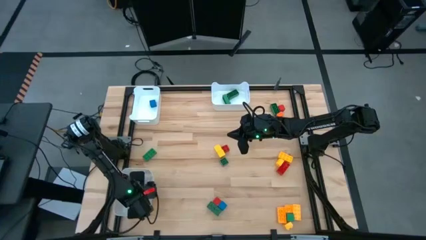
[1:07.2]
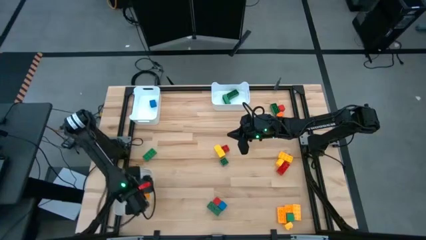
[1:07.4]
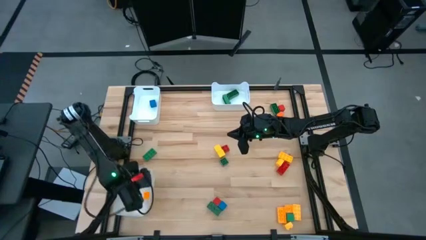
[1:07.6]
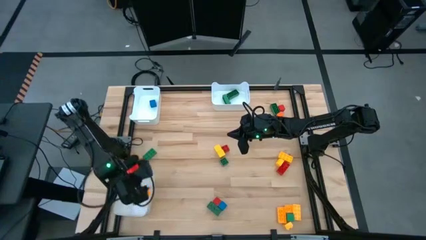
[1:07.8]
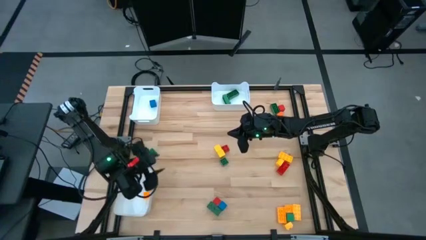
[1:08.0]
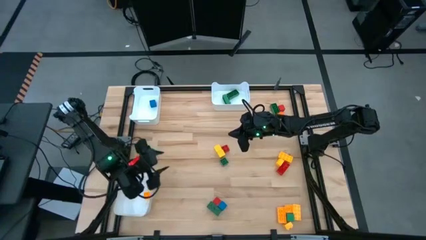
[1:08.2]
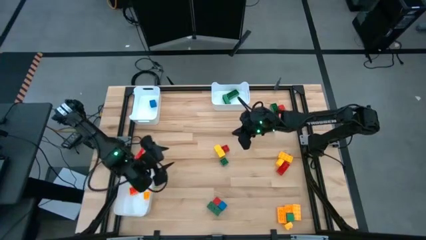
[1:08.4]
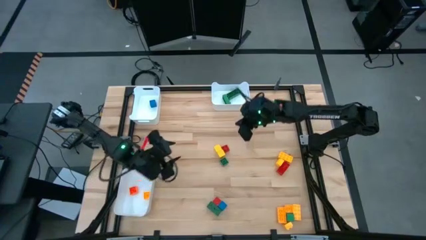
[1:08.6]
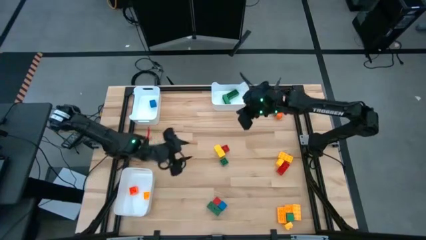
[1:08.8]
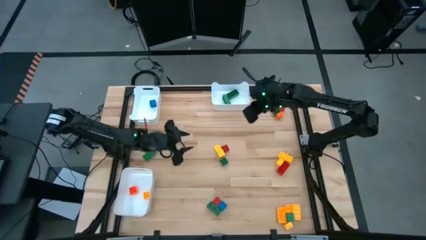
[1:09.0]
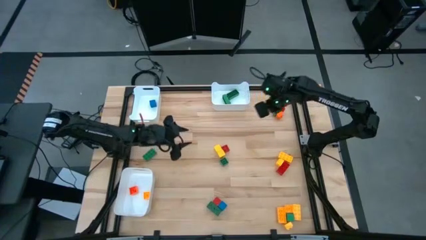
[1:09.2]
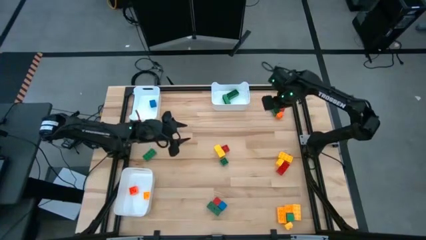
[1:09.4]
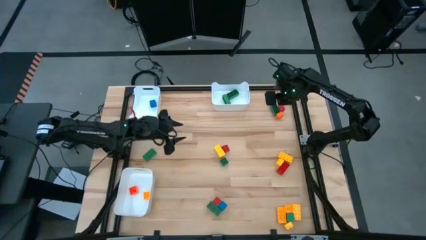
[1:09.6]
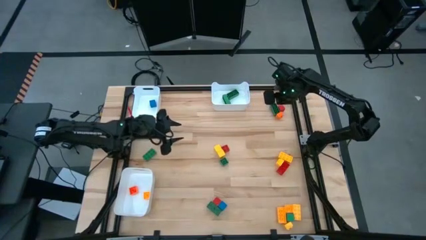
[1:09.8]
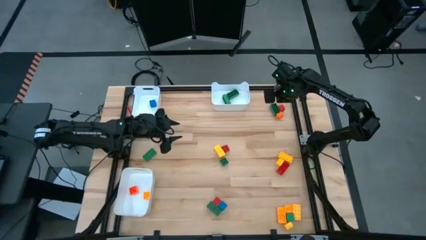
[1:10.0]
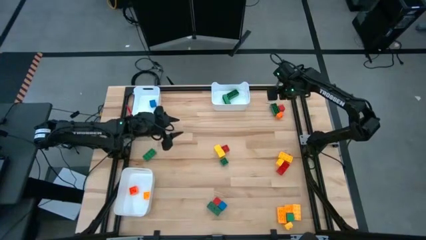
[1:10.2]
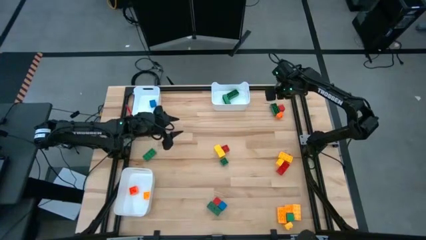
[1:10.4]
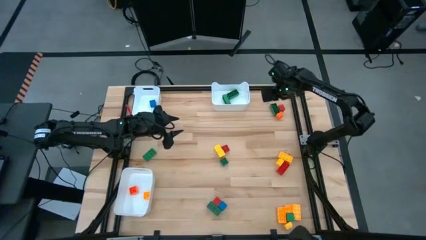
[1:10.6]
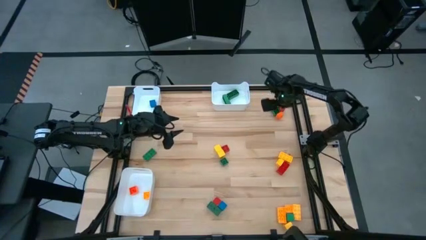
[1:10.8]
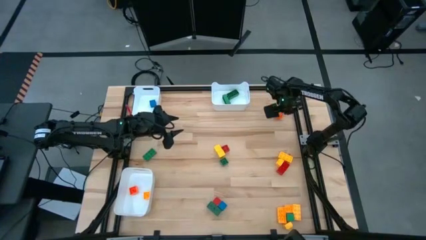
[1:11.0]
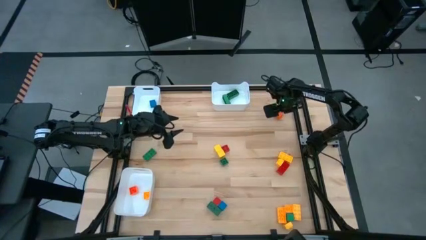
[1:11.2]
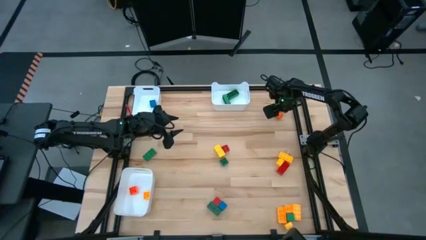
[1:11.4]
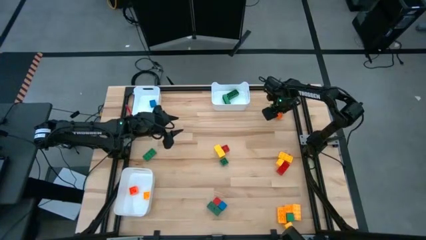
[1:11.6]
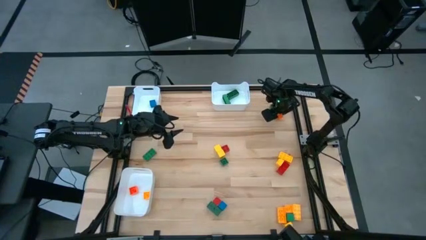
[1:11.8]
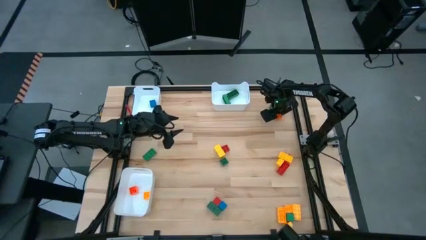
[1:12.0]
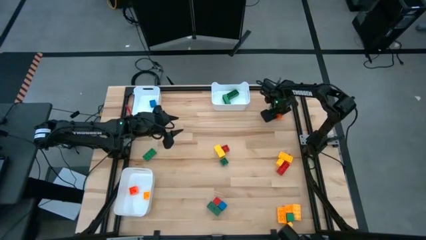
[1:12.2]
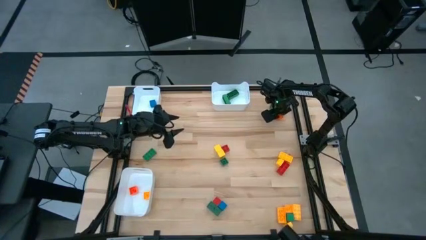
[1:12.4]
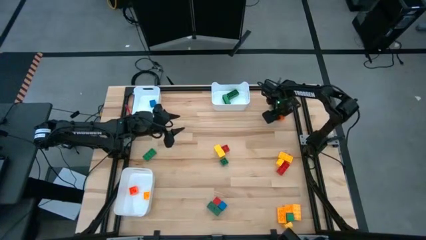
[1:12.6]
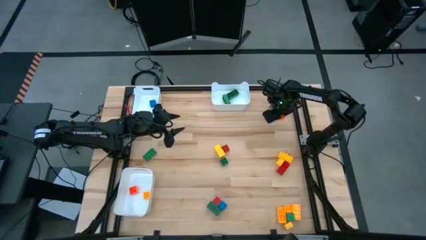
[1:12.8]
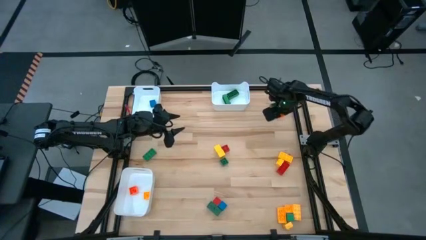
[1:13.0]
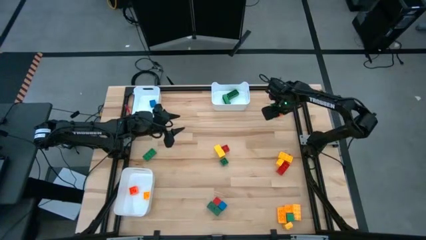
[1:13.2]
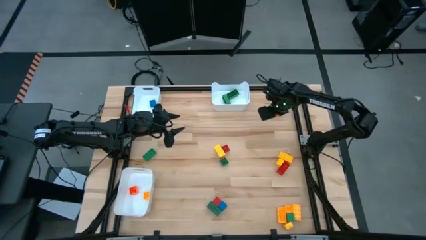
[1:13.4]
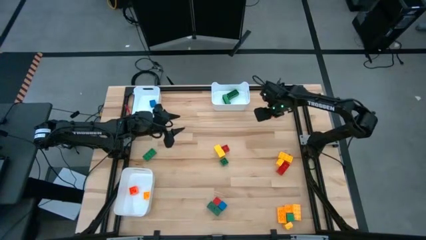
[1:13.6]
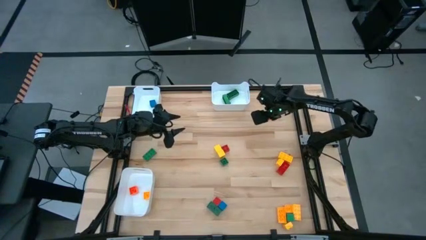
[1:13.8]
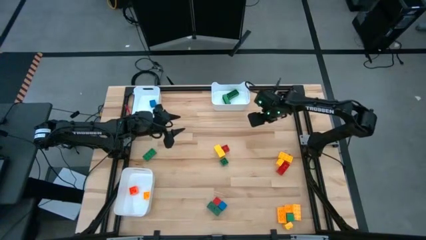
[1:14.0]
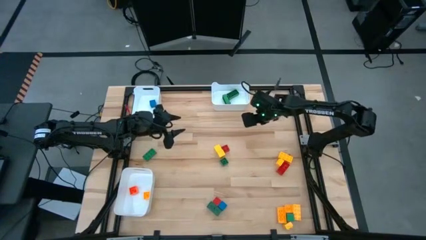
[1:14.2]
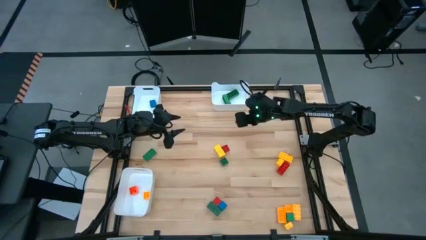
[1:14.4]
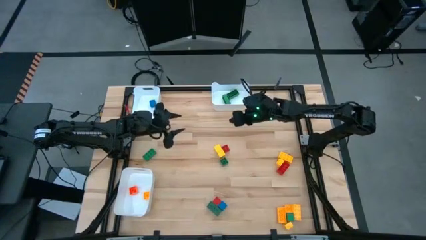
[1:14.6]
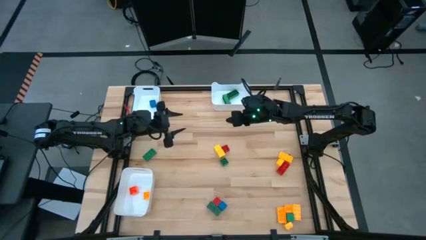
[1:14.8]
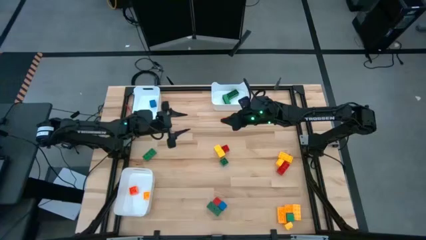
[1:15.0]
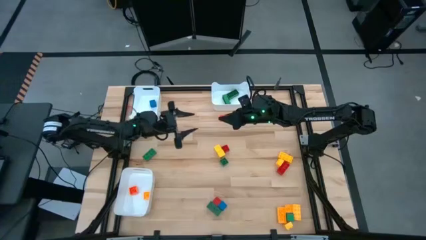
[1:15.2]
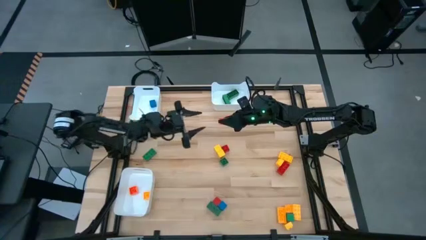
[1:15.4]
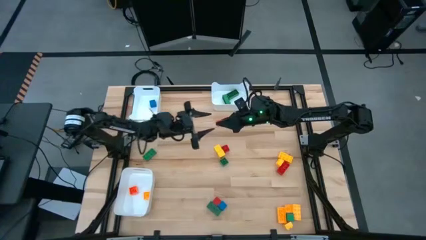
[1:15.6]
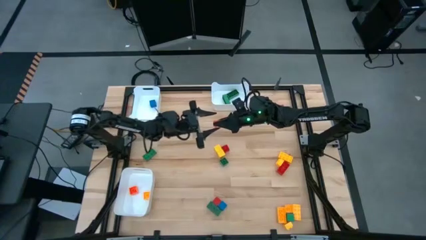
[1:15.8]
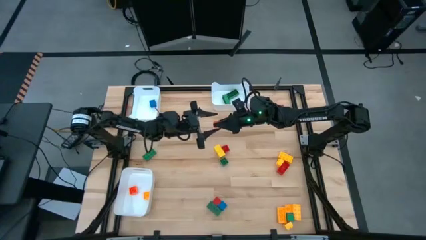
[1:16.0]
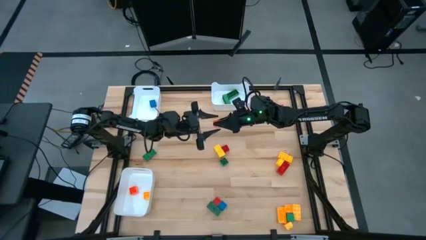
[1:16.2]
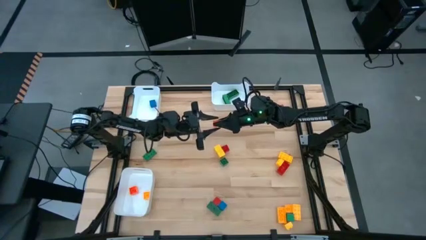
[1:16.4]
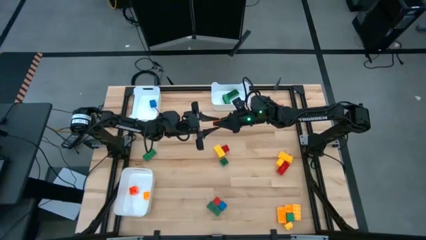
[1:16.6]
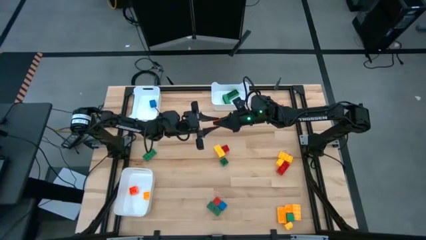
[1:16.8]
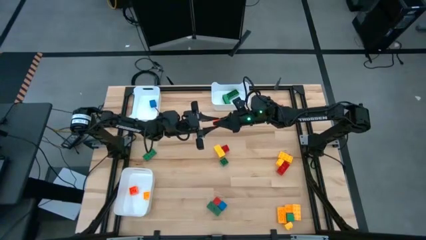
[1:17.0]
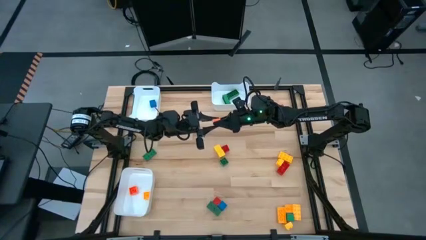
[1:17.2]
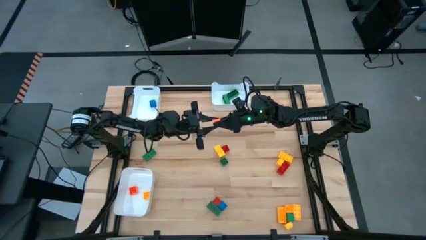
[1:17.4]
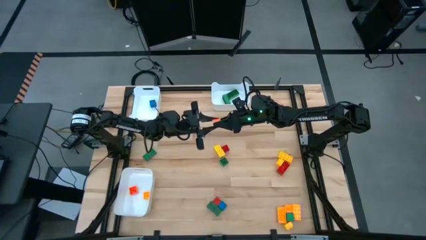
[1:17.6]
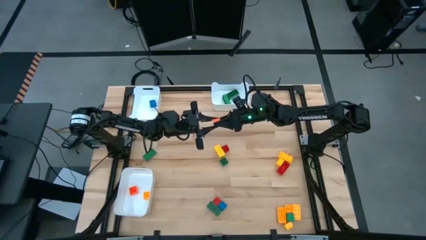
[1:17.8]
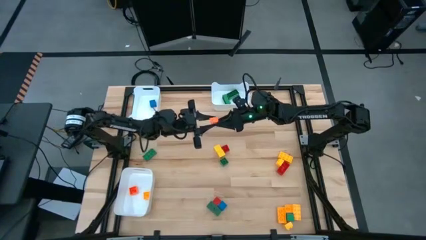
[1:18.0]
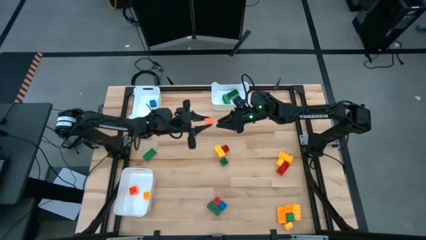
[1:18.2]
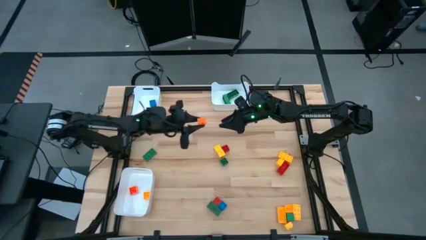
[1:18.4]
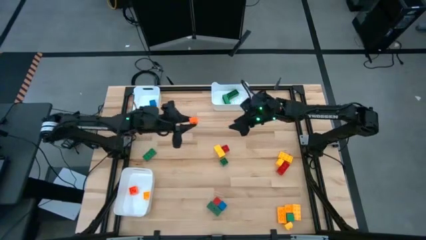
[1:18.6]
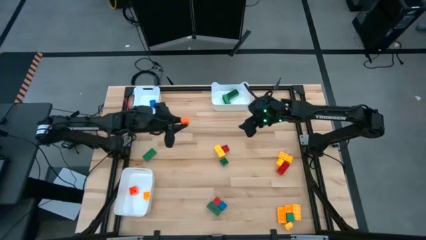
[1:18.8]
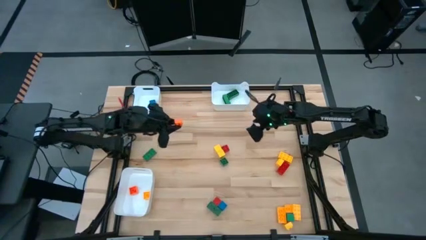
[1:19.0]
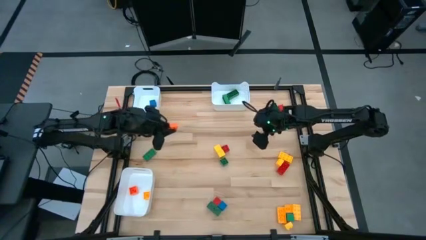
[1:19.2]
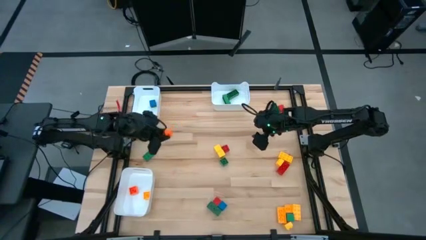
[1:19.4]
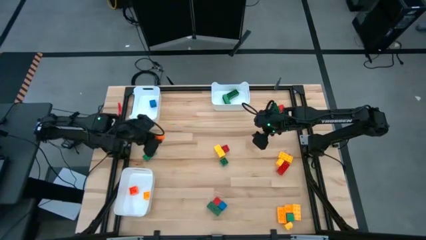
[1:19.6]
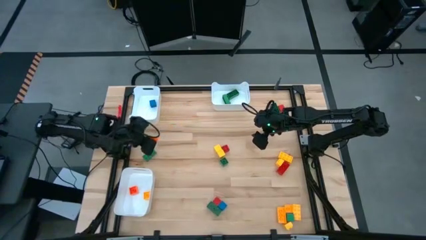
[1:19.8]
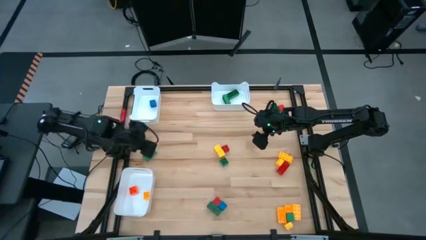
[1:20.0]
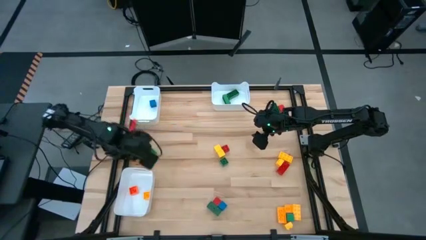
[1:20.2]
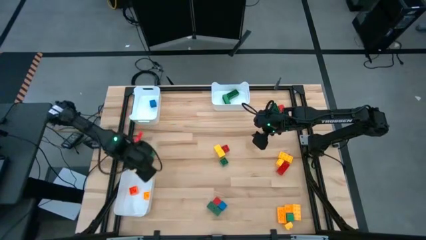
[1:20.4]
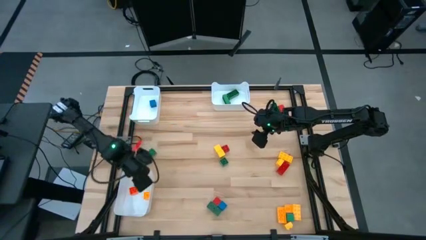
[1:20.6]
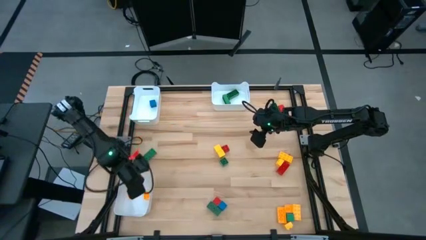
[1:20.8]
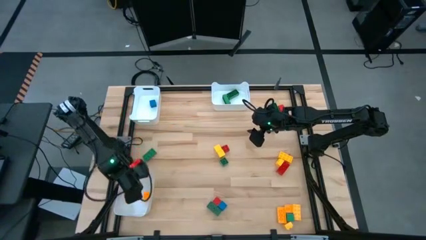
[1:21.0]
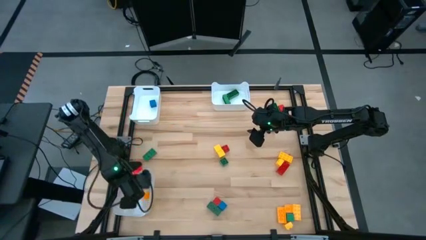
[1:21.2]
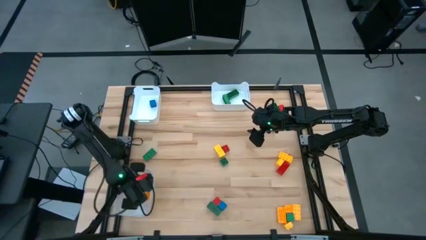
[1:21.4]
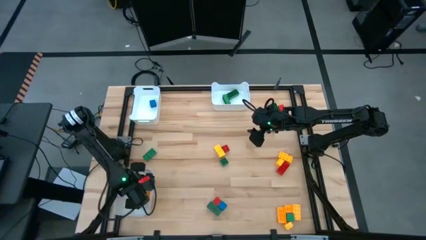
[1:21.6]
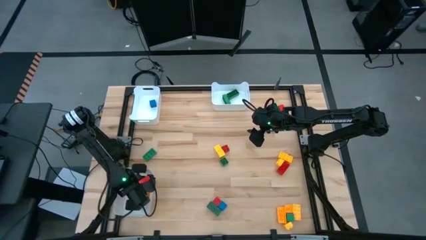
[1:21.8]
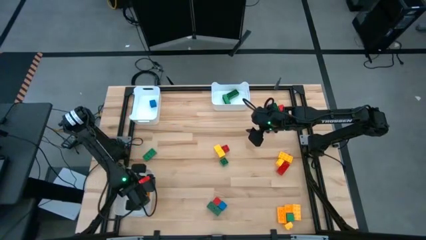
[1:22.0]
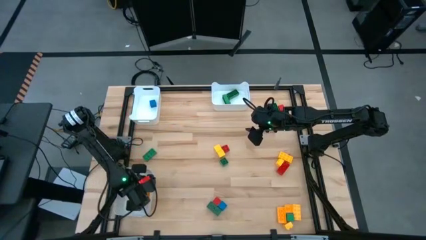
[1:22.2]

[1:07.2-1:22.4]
Task: Sort blocks by size
Put the orange 4 stud game piece into the bottom white bin

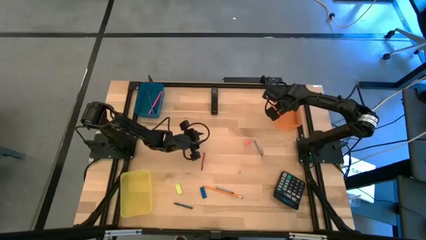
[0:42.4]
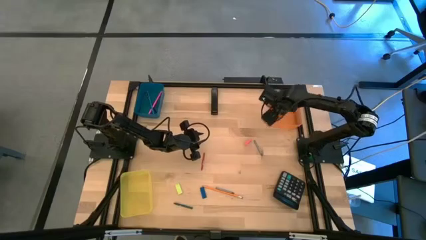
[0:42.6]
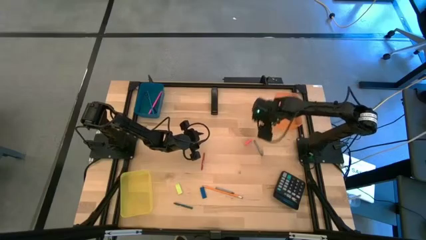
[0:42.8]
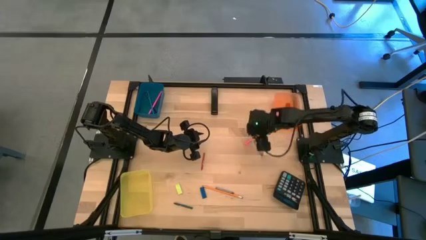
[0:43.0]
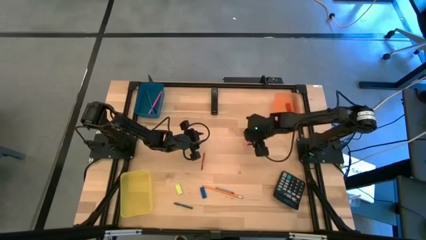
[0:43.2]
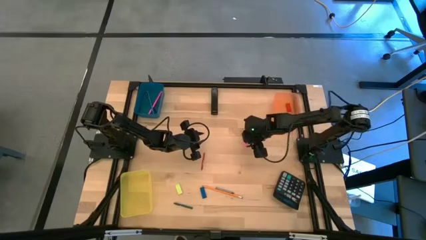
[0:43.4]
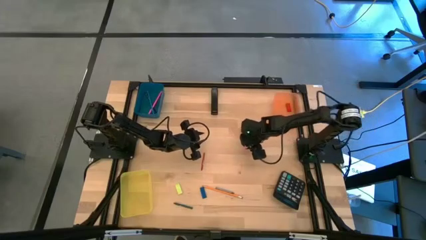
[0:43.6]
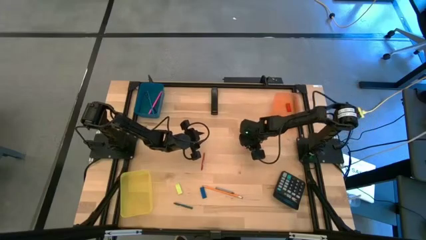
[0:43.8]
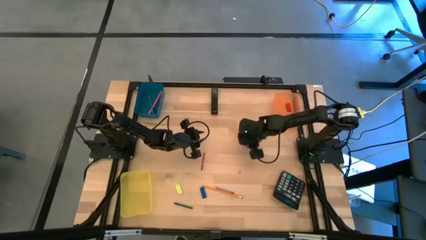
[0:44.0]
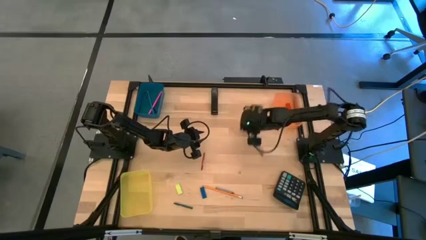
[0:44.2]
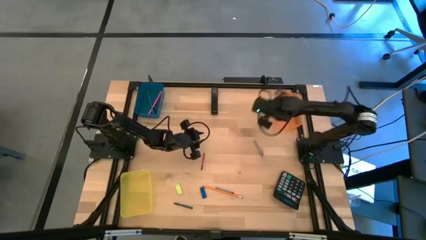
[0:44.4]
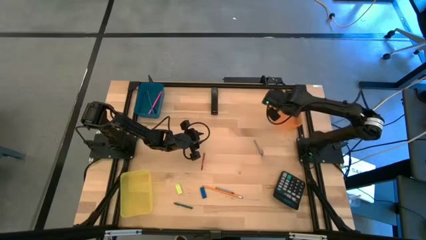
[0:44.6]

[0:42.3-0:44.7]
Task: Sort crayons/erasers/pens/pencils in bins
Put the pink eraser into the orange bin
